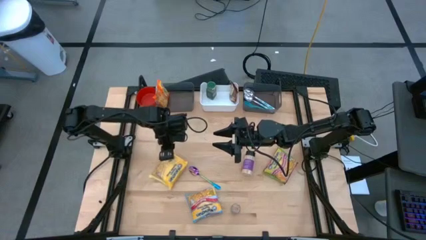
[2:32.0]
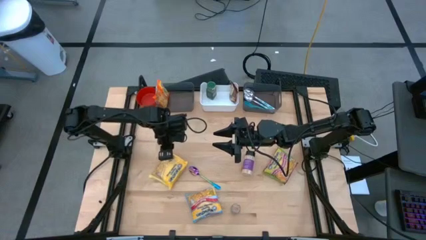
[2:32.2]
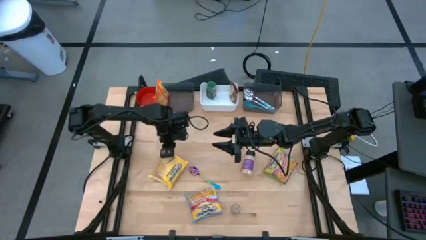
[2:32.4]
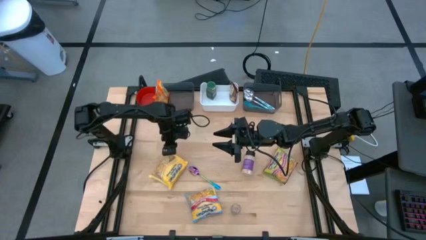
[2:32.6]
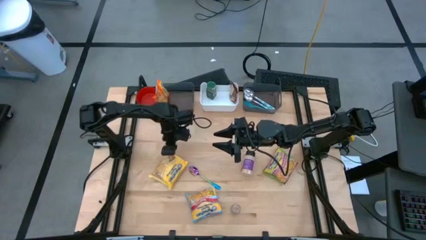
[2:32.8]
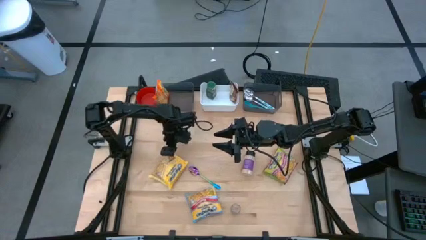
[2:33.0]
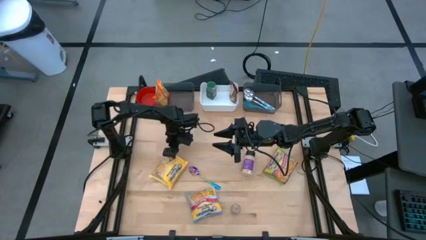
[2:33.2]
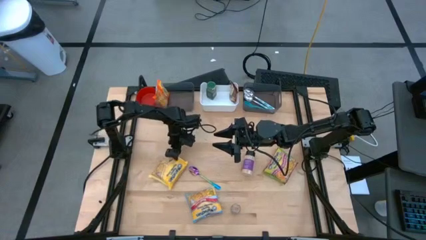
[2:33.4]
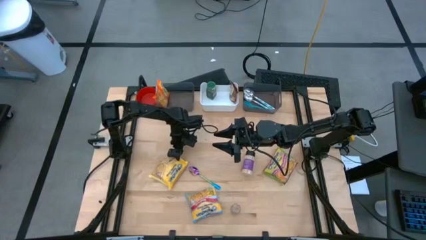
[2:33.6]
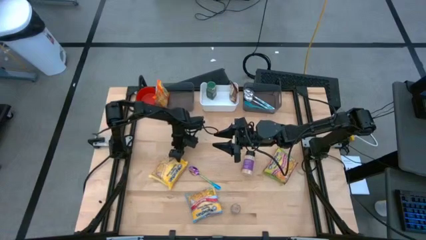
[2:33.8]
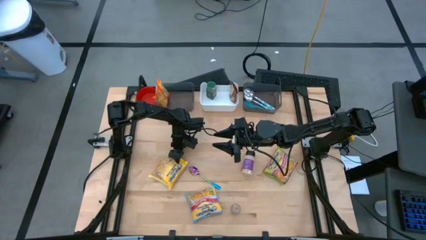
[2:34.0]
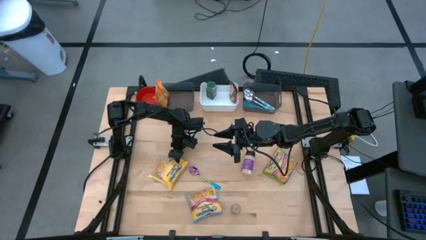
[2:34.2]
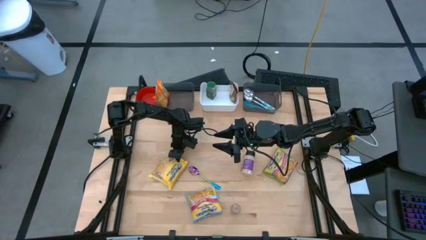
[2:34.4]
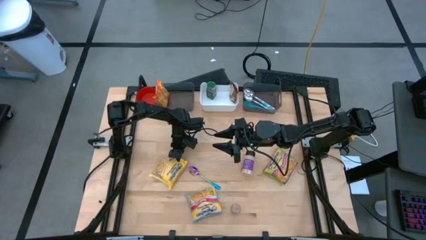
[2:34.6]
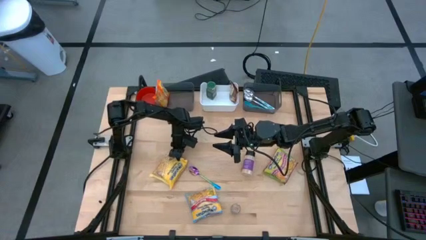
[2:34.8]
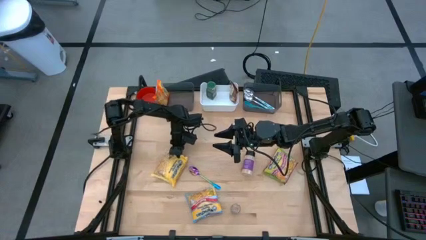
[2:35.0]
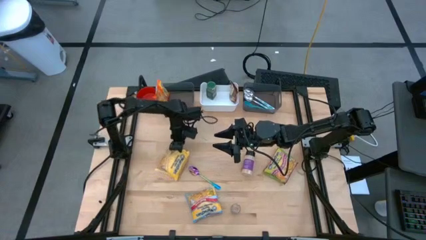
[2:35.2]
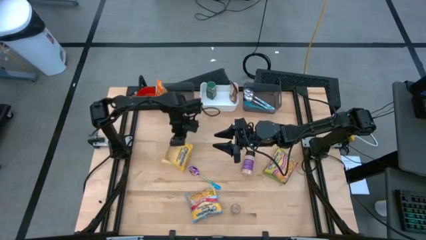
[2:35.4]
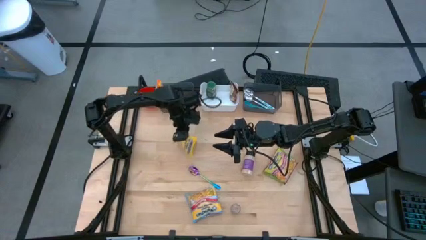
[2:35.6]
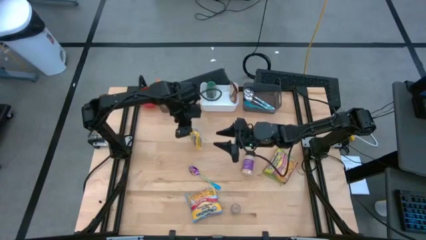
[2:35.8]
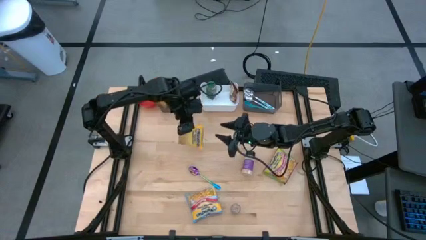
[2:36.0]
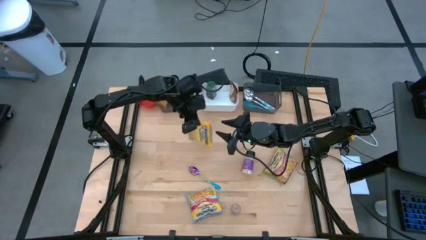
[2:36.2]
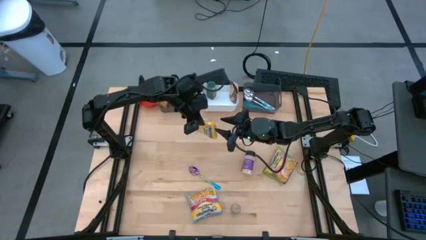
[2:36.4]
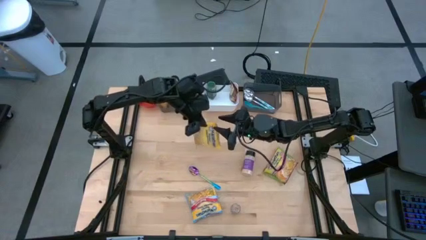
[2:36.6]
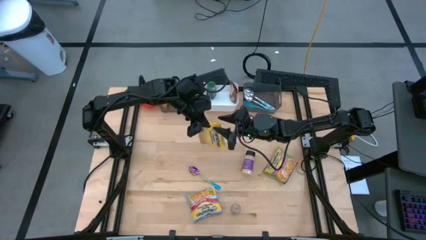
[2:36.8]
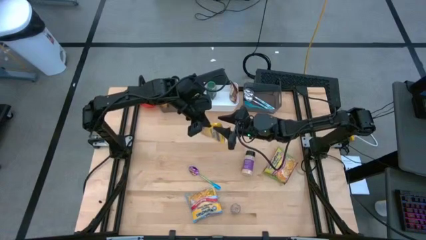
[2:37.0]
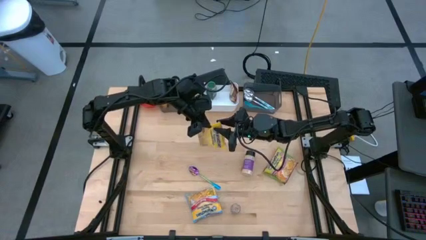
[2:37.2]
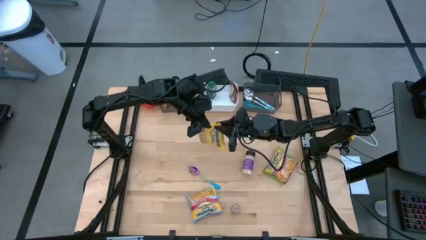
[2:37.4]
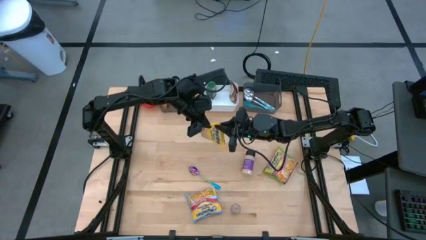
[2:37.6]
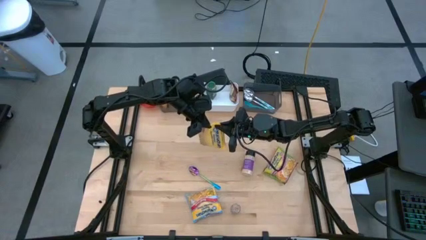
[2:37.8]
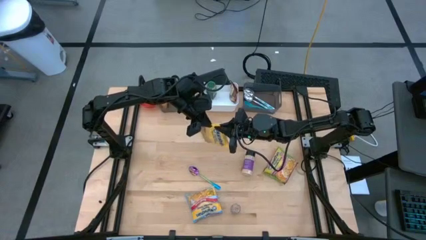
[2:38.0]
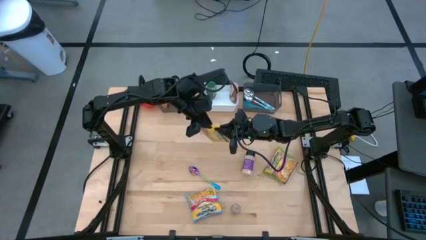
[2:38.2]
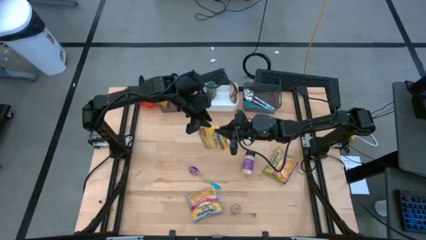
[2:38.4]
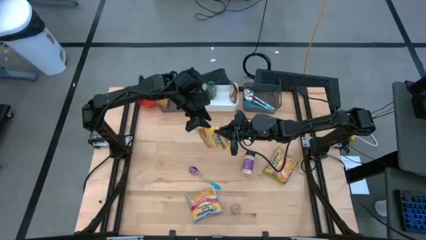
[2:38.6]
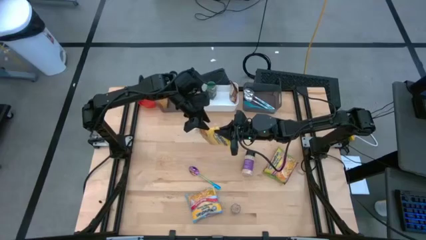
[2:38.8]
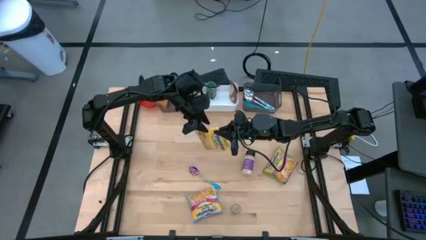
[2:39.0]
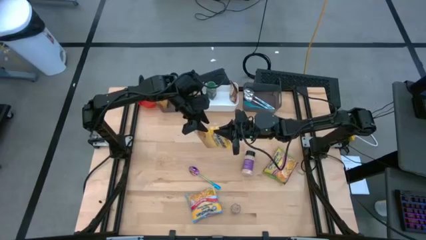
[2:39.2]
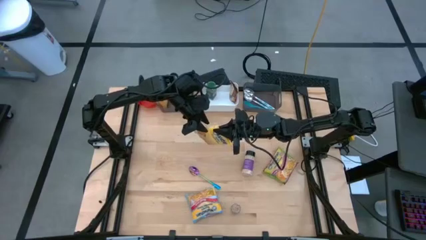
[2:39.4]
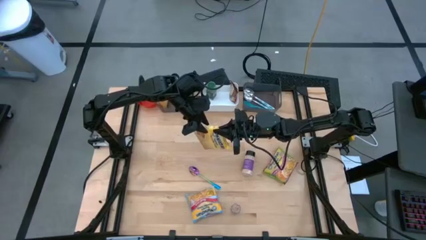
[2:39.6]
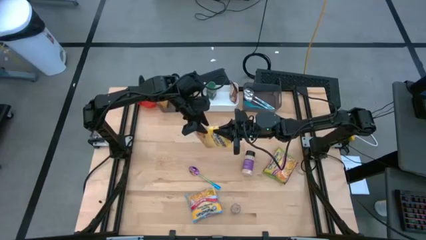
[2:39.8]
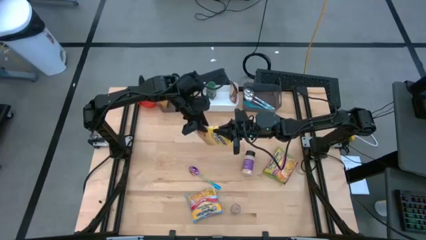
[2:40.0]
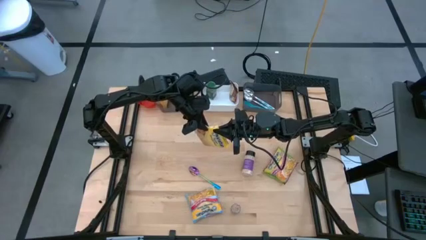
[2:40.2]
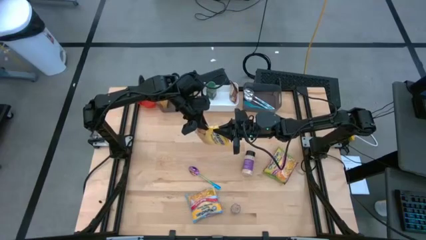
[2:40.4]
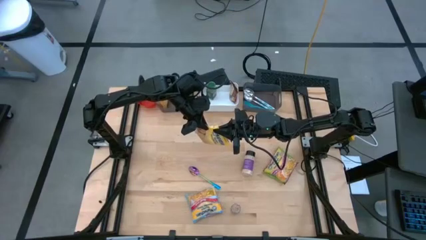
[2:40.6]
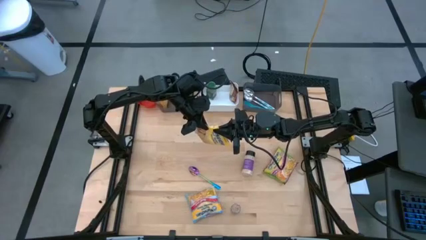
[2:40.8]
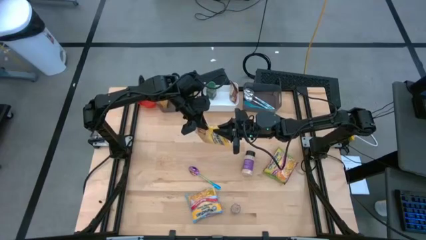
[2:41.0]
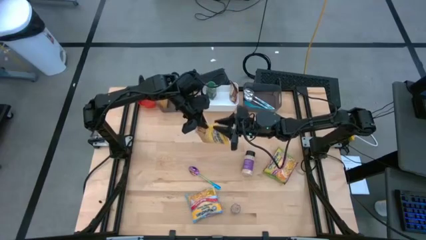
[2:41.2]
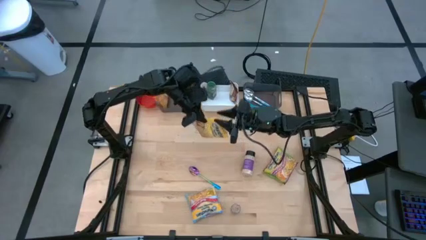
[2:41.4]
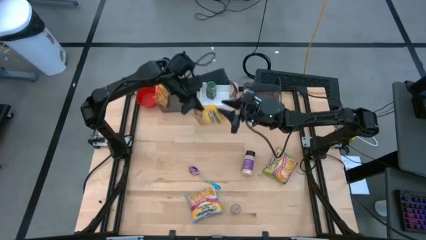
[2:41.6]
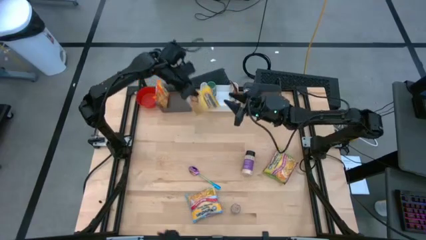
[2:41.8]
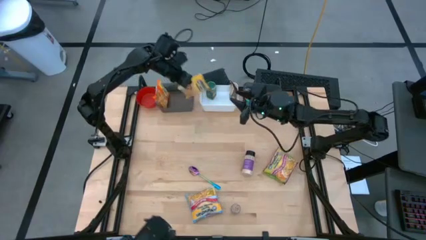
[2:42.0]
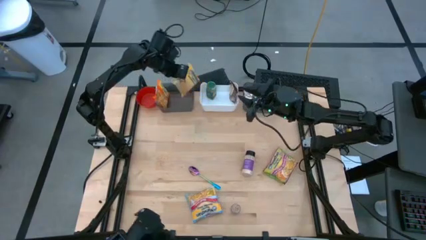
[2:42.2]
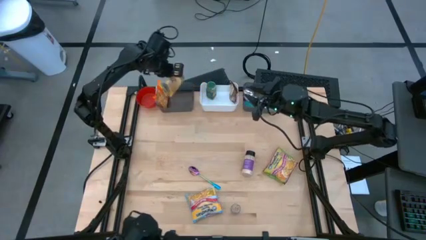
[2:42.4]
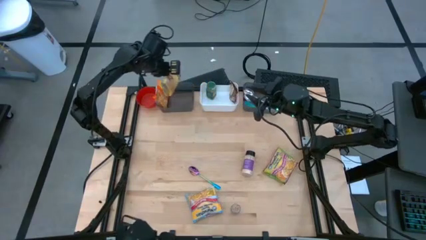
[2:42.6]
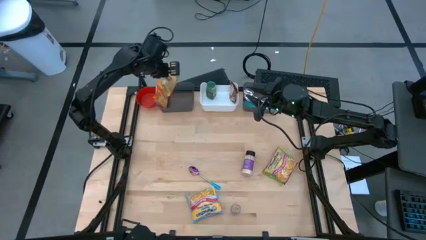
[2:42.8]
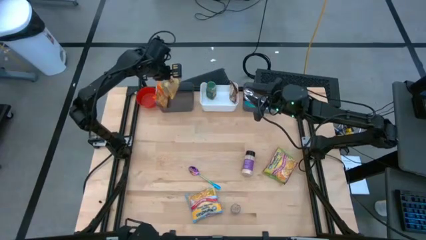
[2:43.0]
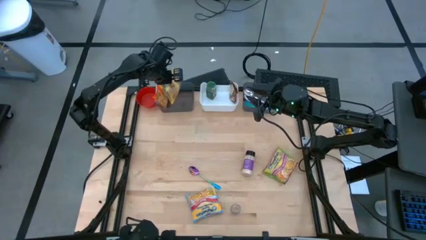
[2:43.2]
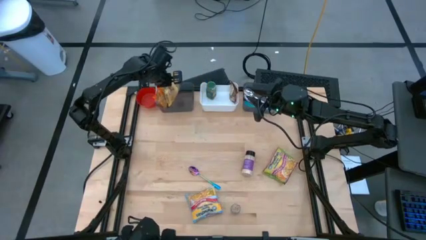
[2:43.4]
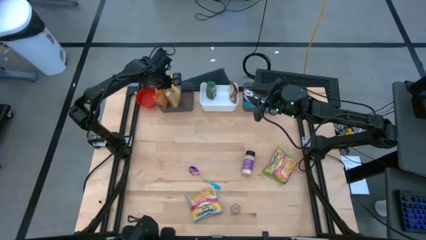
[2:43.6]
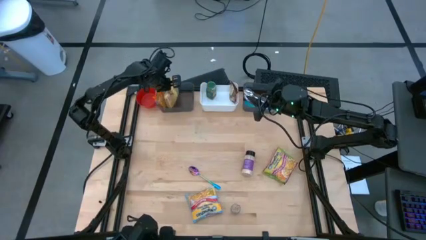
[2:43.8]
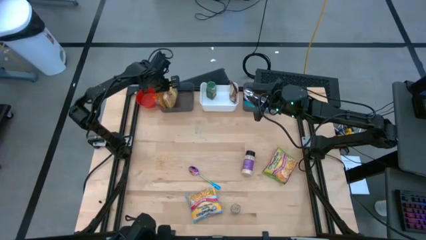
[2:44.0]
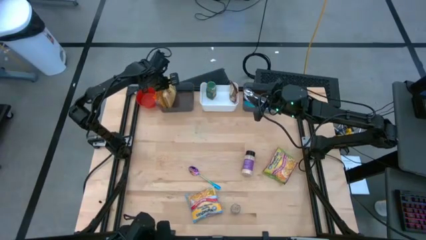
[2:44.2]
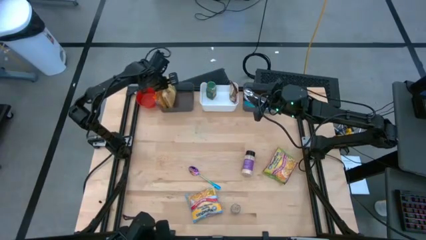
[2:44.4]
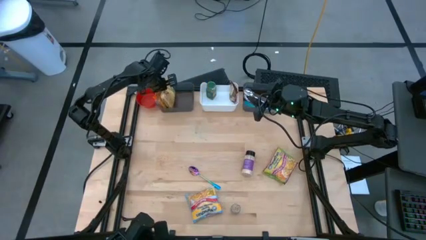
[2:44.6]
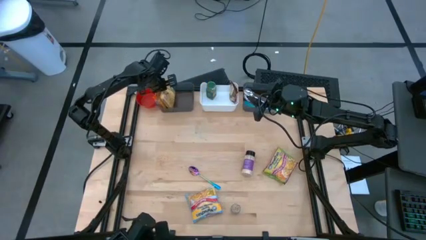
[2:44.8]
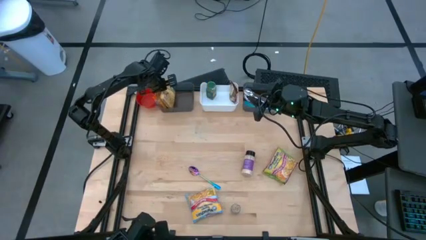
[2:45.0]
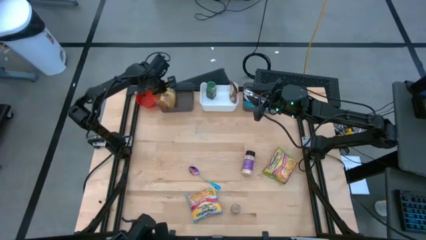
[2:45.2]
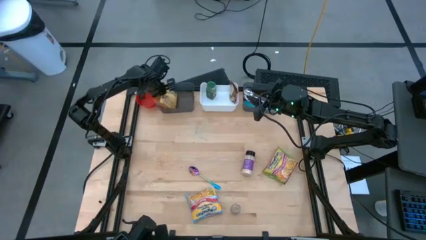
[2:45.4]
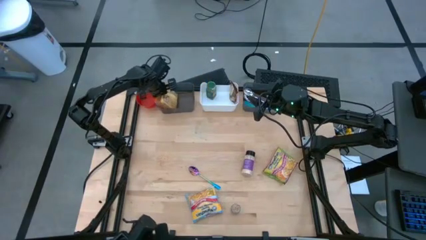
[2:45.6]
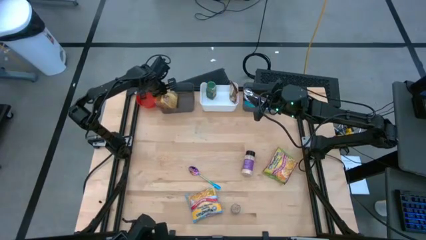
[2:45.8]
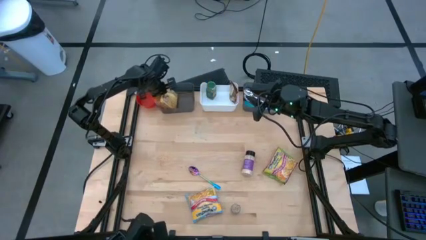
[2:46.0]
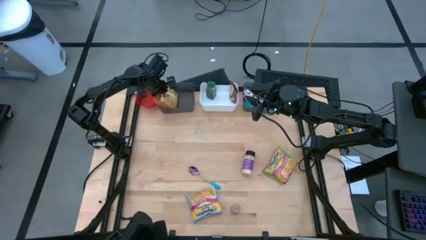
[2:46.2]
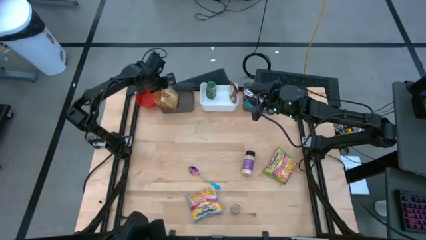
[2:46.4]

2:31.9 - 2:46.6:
Task: Pick & Place Food Item
Put the yellow noodle pack into the left black bin
